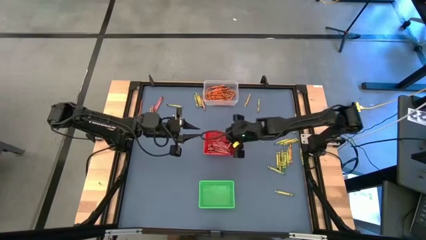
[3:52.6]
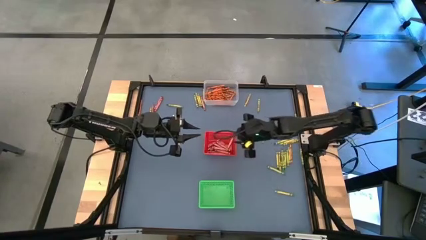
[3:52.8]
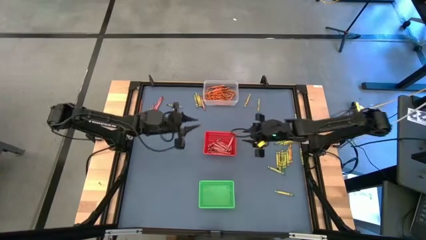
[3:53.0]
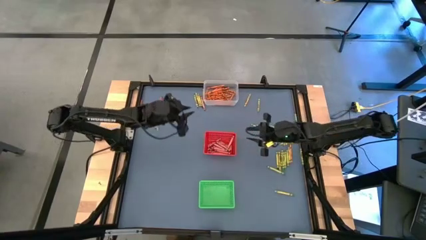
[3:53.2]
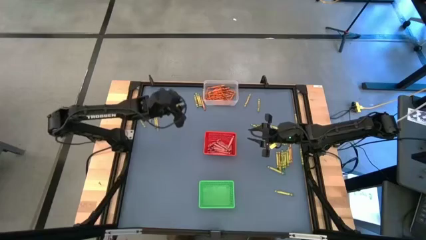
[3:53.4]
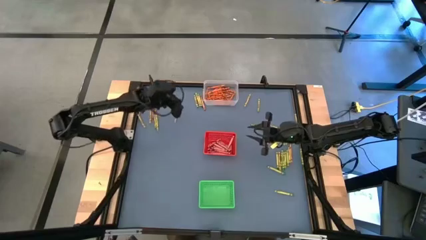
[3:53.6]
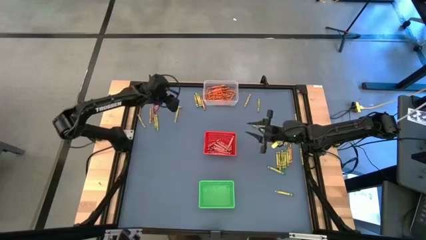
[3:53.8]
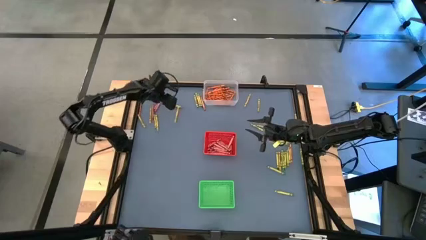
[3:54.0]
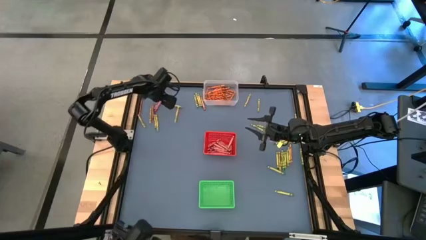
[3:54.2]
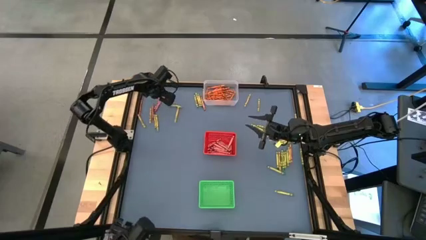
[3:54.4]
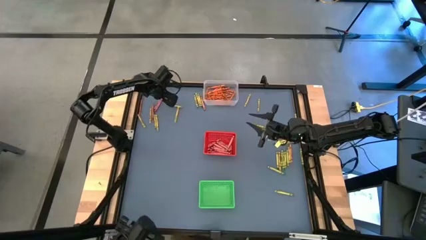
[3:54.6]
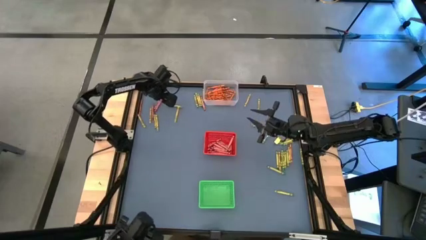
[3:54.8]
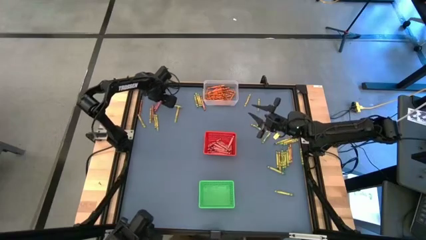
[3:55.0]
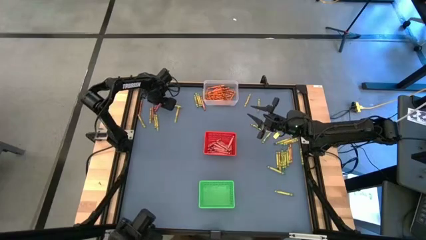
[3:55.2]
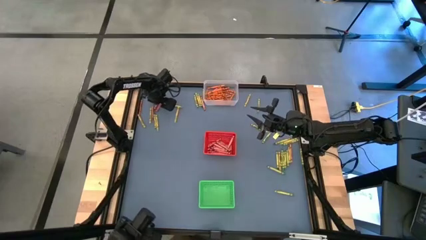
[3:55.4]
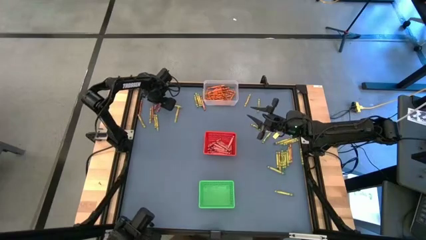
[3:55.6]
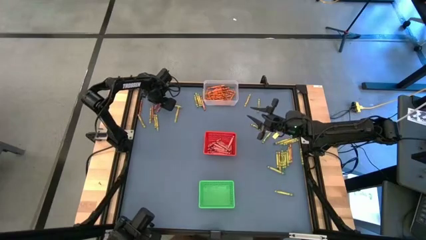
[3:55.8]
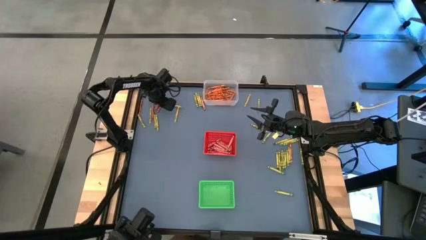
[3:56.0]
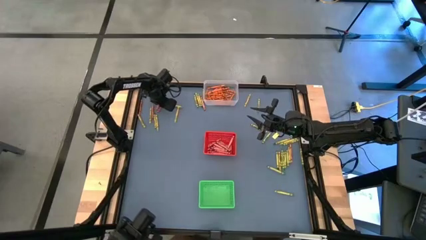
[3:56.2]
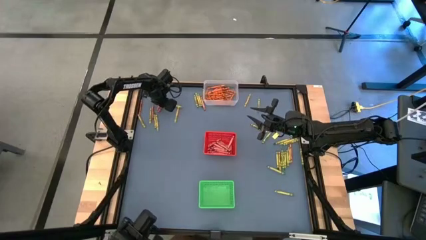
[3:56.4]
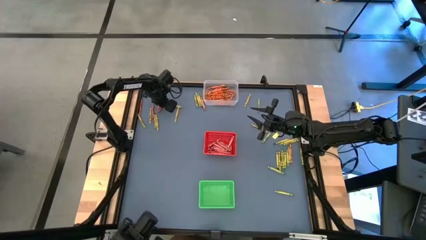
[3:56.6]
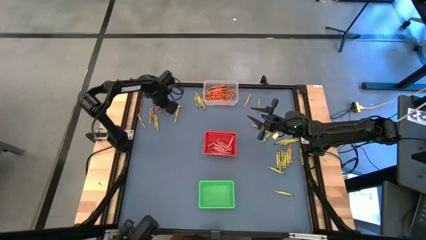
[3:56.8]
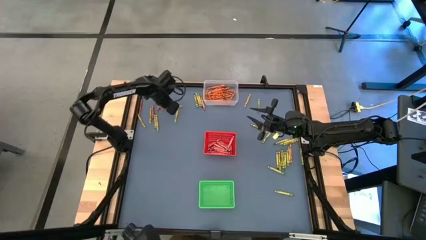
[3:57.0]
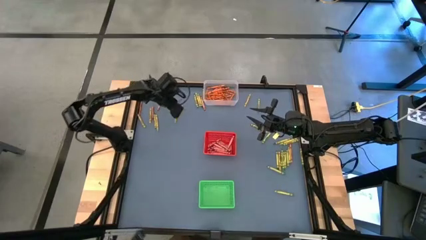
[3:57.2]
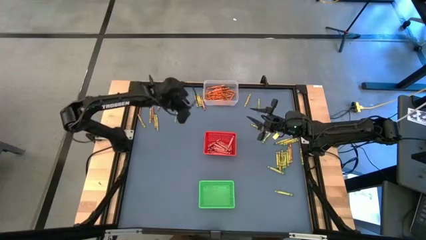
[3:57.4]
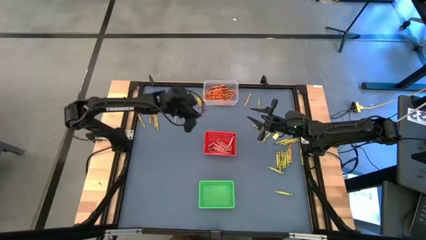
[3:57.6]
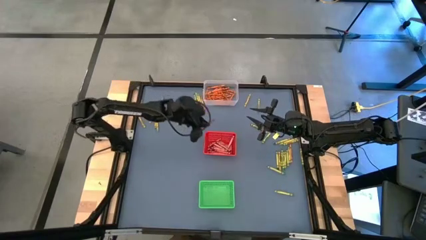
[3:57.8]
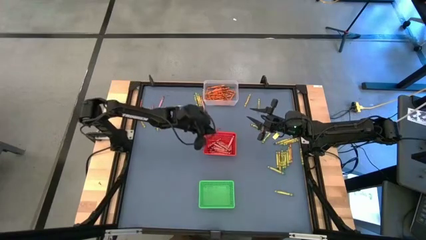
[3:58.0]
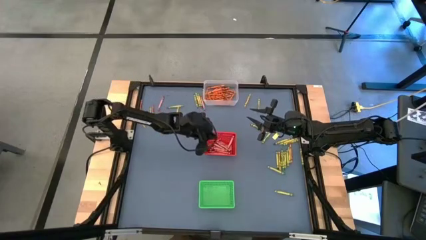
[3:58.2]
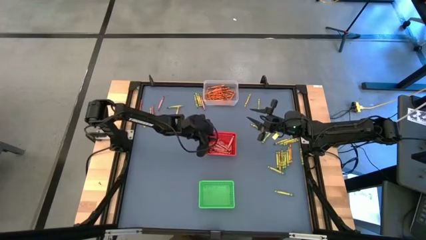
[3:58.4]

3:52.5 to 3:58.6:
Task: Sort crayons
Put the red crayon into the red bin

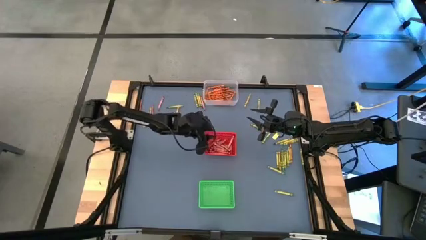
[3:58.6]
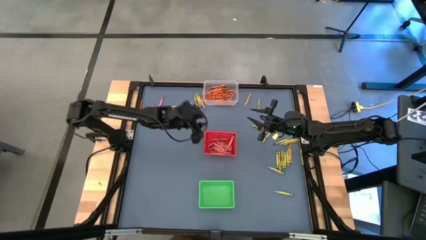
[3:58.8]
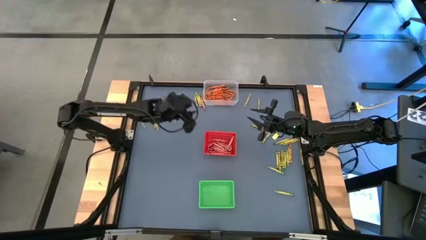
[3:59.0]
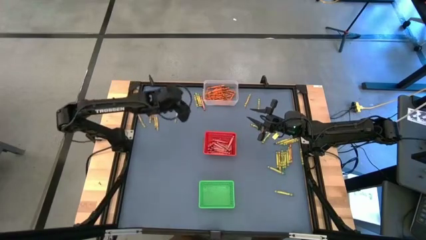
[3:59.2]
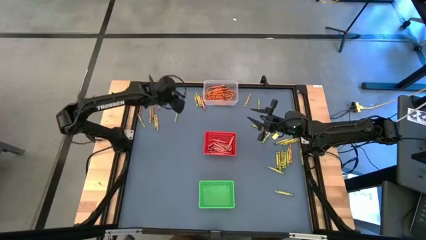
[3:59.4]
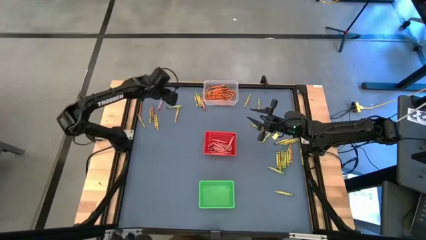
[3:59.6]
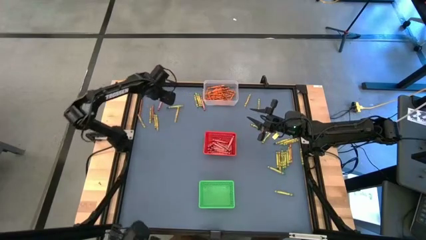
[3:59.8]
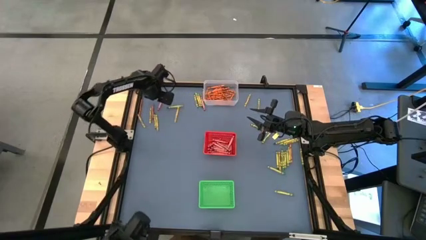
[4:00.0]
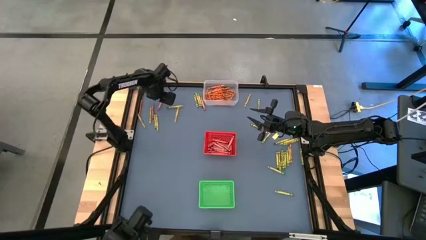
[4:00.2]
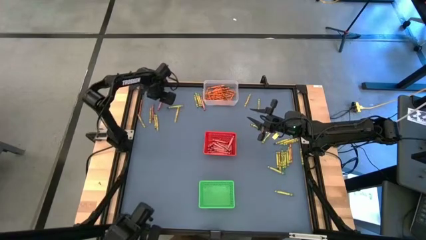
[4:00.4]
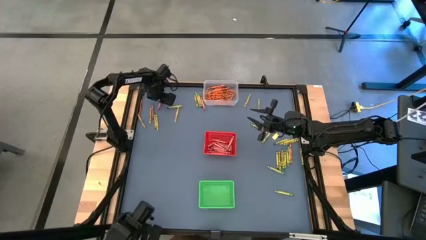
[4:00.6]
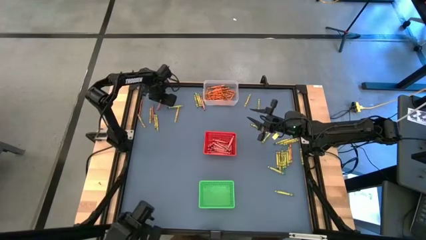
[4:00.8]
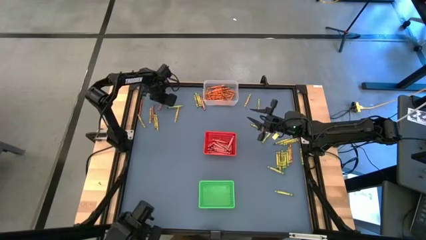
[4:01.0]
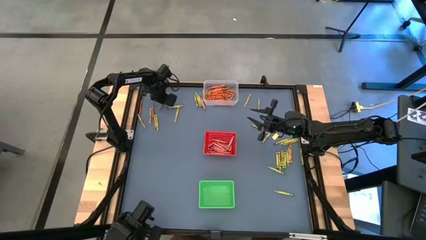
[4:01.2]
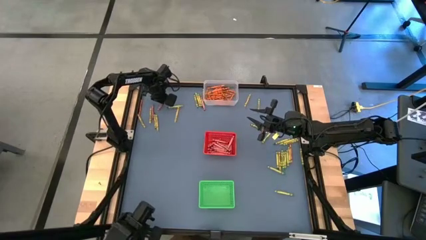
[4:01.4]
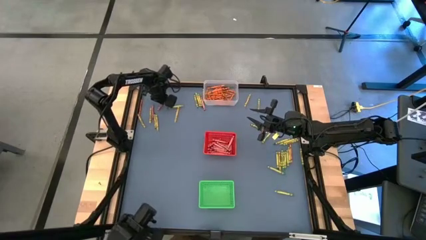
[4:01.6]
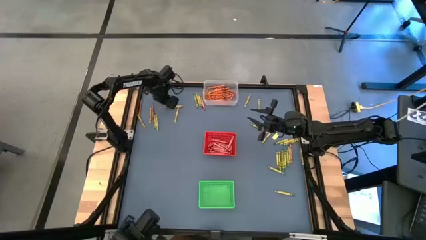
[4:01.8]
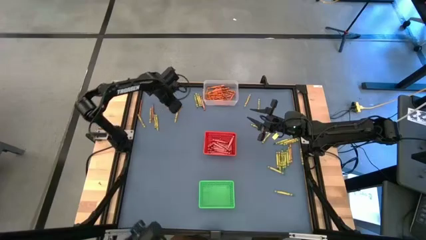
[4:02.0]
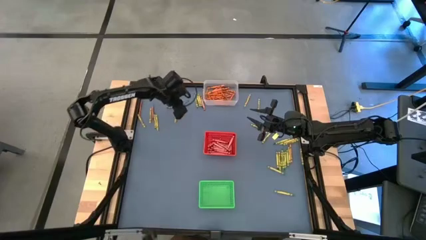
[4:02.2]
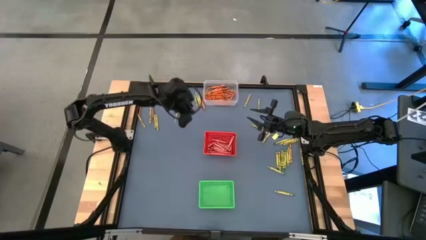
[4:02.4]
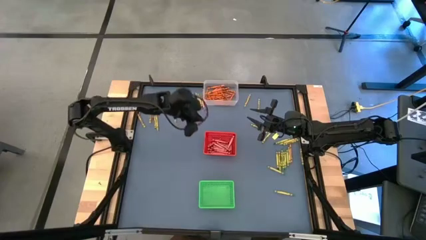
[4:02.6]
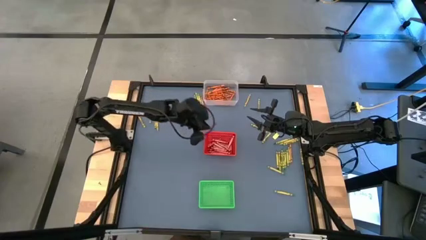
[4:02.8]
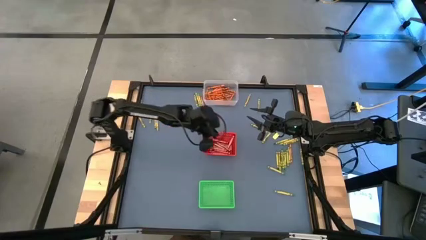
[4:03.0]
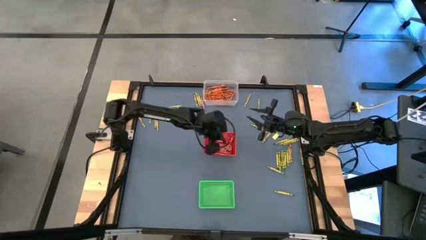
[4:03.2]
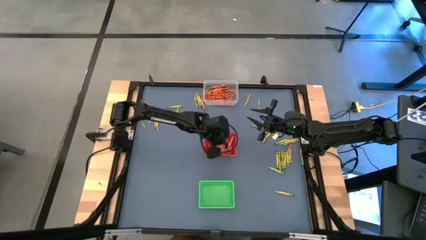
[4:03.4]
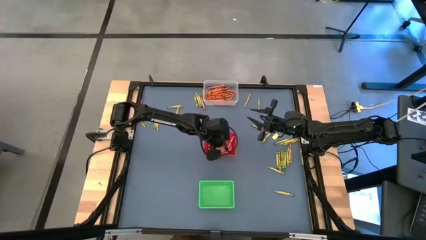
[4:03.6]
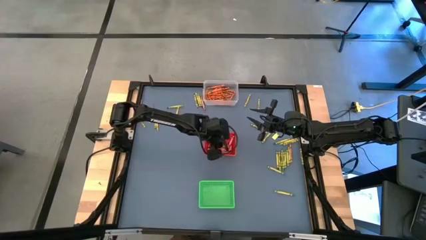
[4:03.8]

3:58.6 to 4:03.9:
Put the red crayon into the red bin

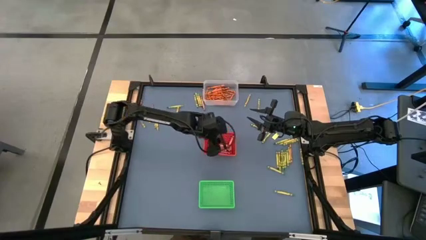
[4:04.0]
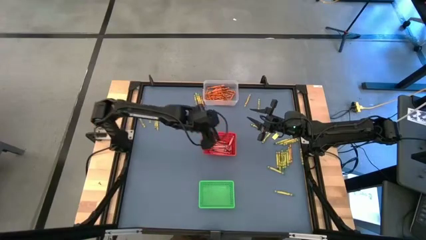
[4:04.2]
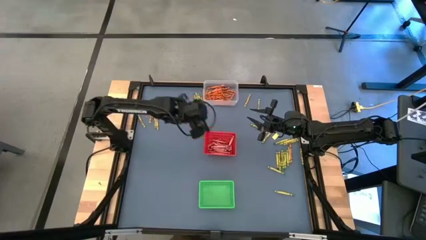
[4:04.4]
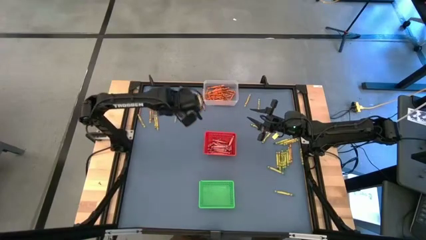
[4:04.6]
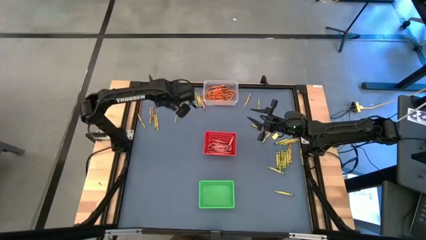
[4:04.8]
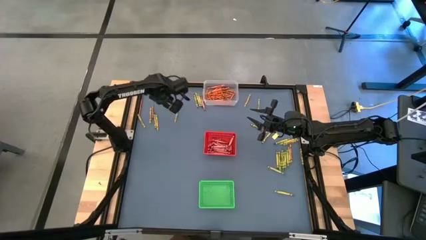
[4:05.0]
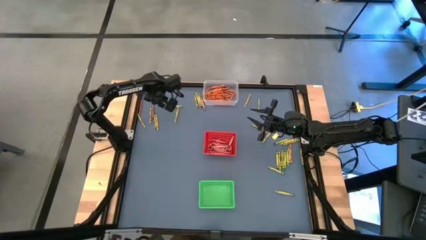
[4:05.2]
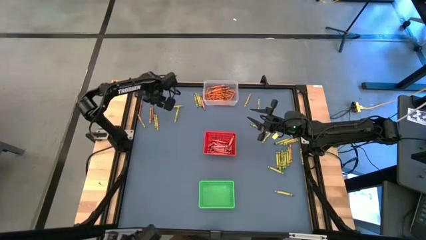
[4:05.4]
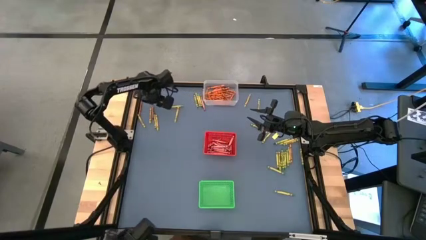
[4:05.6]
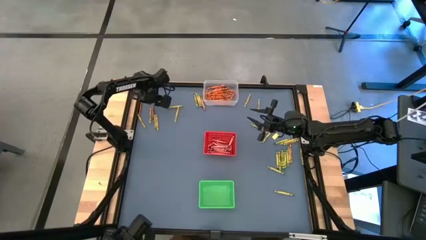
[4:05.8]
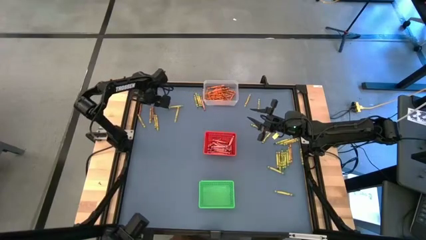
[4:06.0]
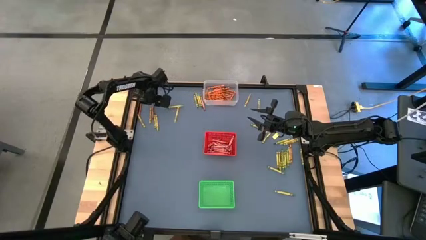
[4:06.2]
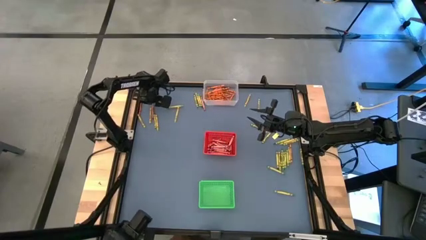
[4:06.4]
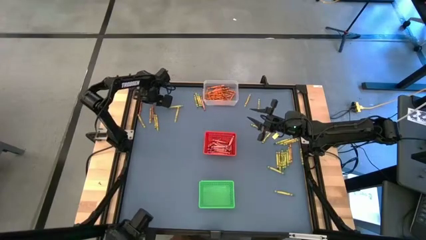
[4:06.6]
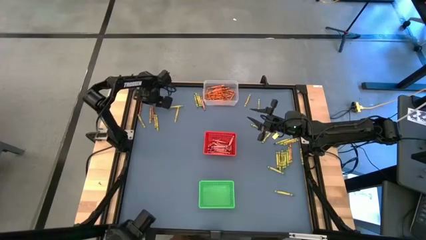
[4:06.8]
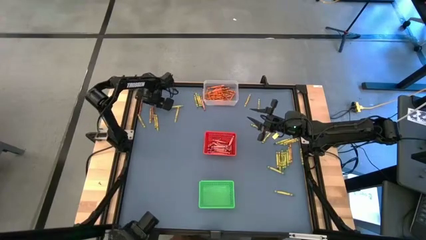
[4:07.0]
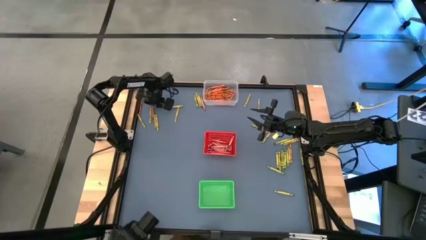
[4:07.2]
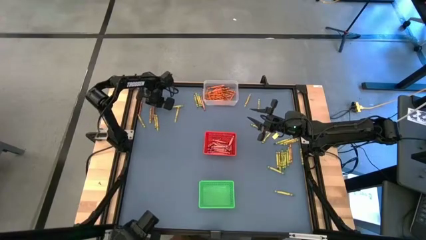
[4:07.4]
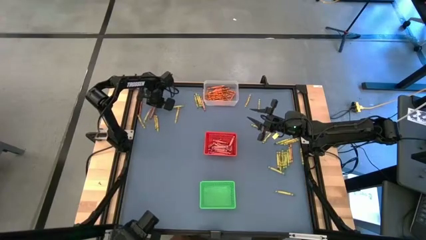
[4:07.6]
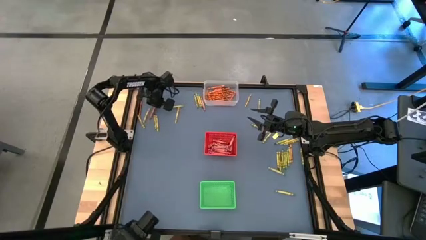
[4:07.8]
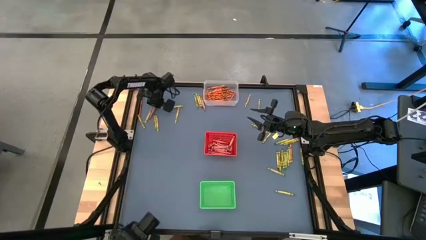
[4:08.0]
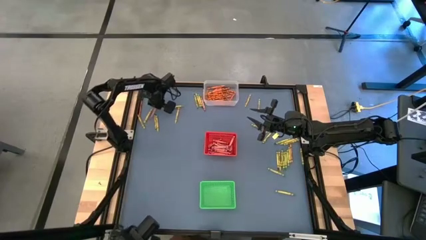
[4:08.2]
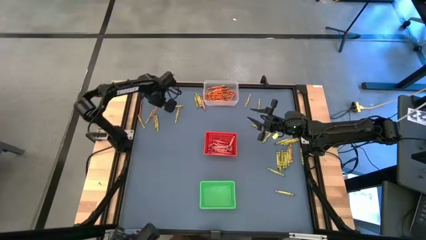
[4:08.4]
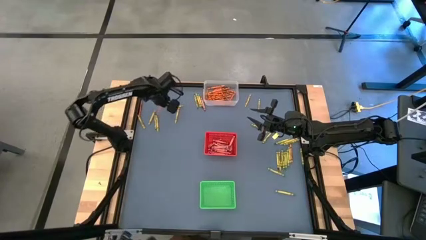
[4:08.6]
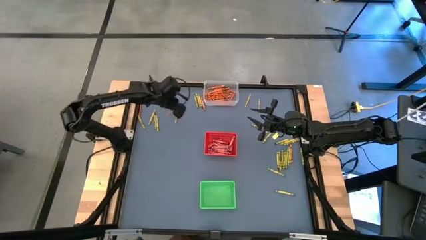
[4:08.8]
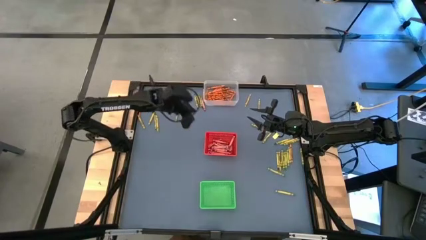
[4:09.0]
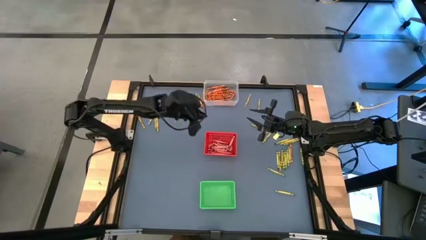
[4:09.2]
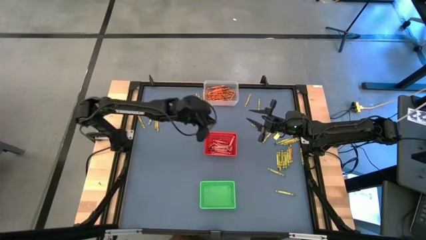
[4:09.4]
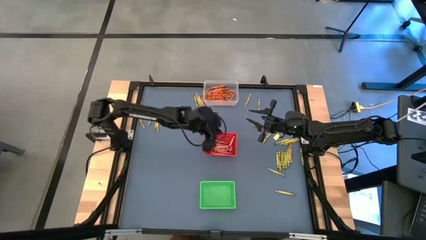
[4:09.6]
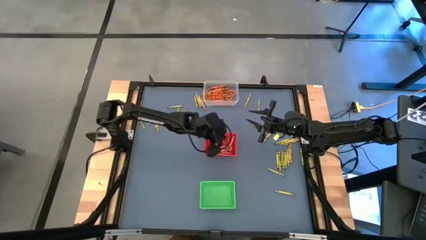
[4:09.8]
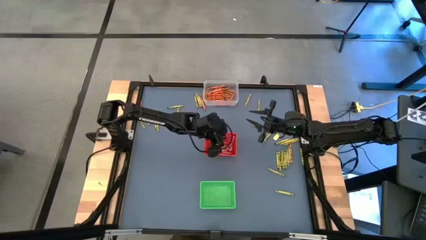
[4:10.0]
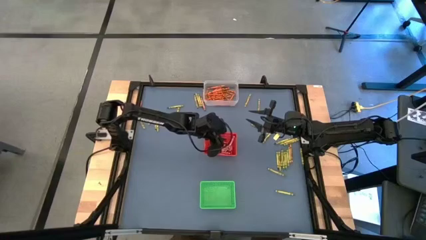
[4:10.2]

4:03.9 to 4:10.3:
Put the red crayon into the red bin
